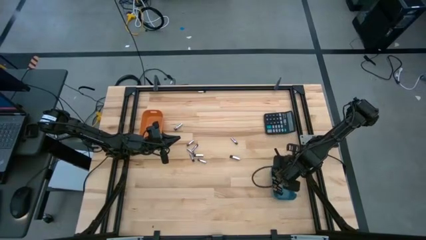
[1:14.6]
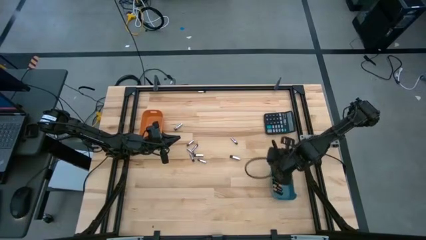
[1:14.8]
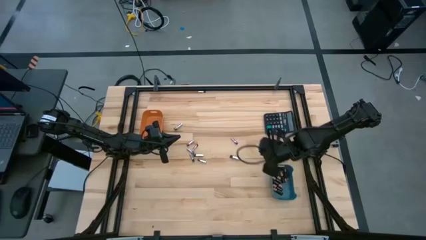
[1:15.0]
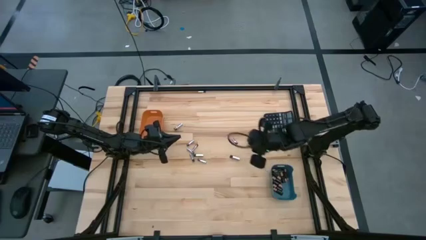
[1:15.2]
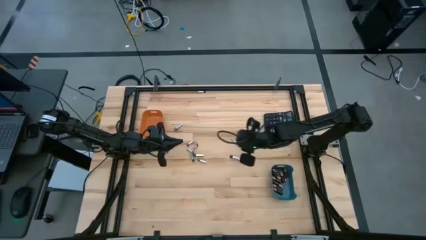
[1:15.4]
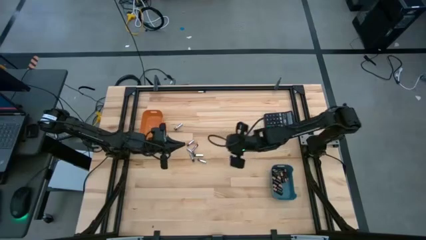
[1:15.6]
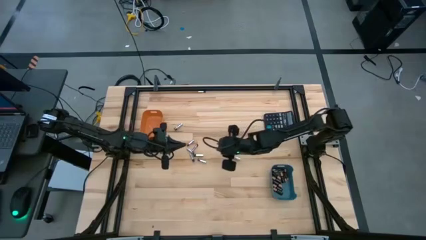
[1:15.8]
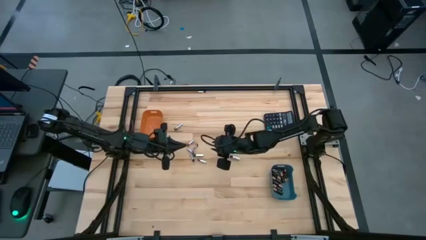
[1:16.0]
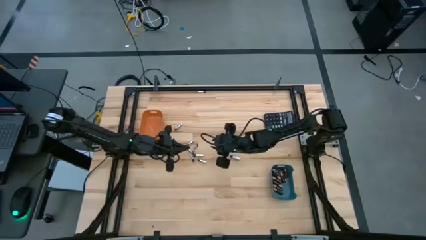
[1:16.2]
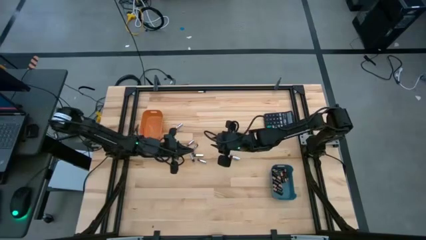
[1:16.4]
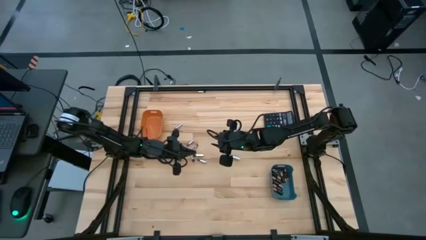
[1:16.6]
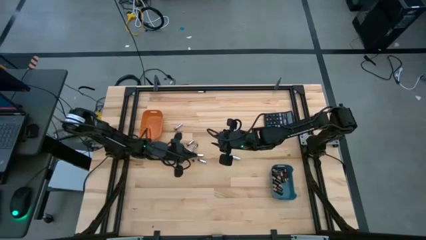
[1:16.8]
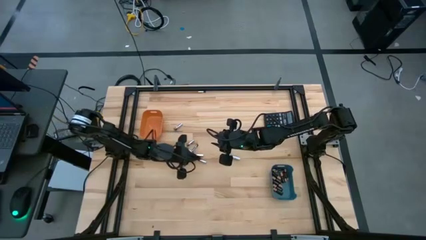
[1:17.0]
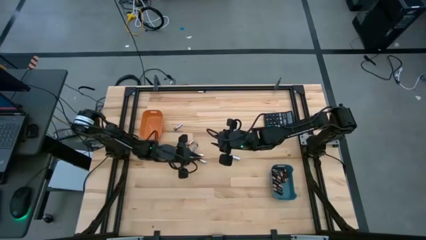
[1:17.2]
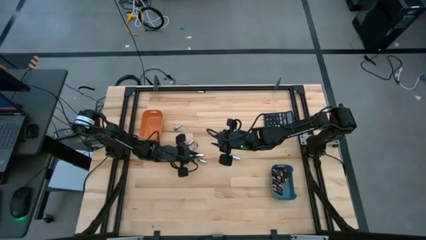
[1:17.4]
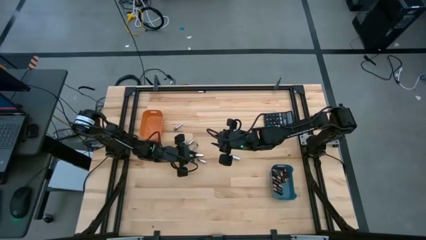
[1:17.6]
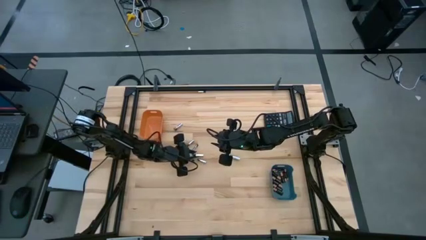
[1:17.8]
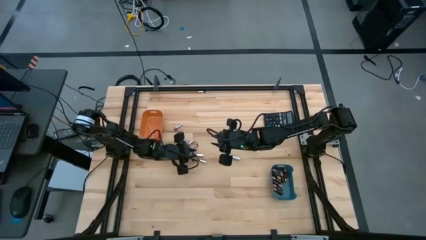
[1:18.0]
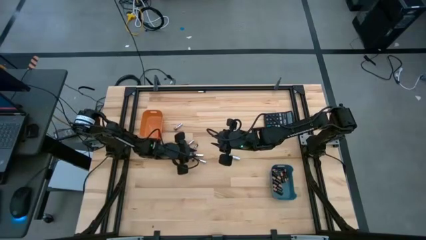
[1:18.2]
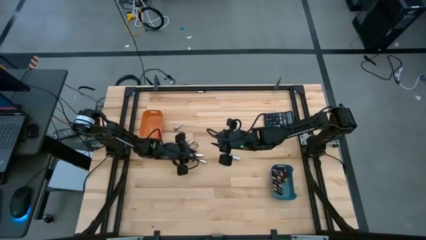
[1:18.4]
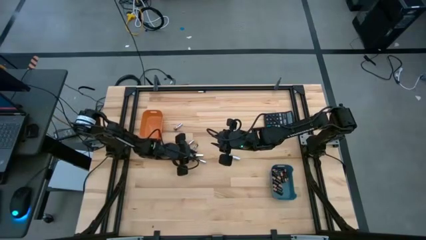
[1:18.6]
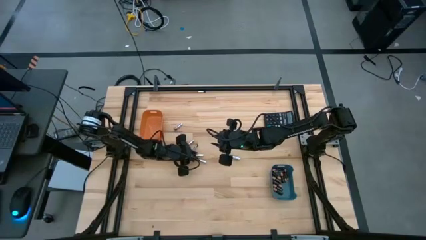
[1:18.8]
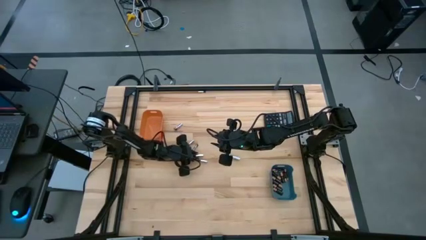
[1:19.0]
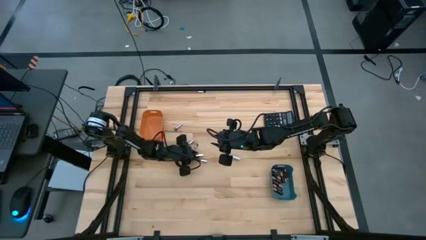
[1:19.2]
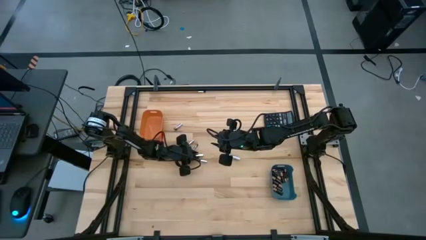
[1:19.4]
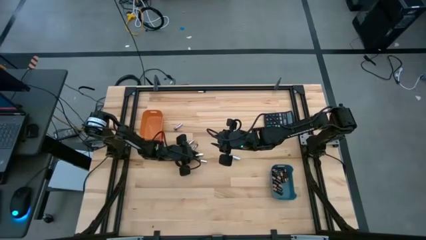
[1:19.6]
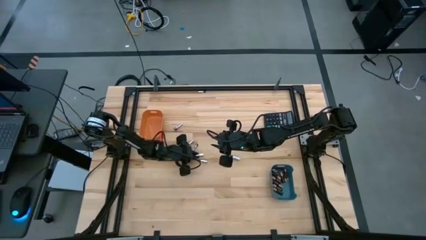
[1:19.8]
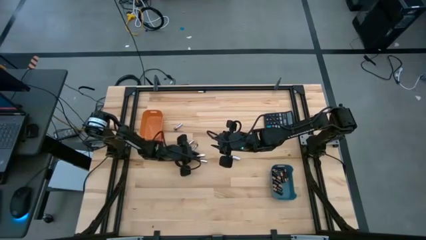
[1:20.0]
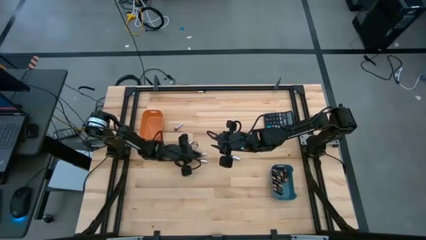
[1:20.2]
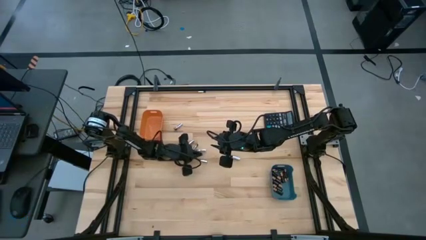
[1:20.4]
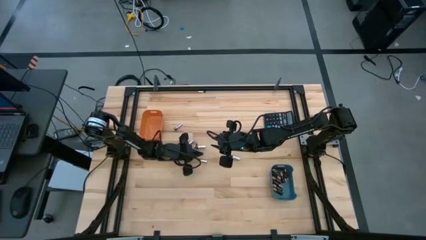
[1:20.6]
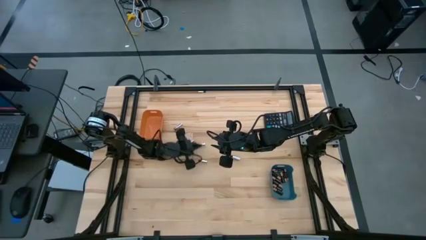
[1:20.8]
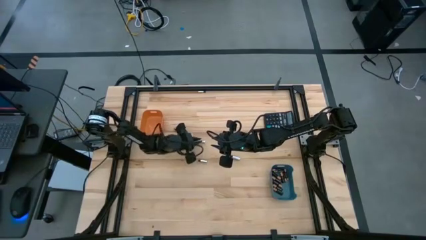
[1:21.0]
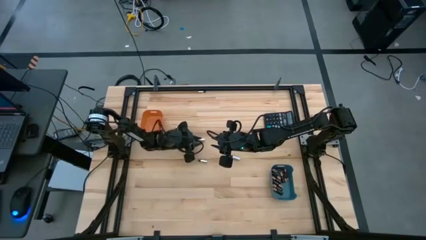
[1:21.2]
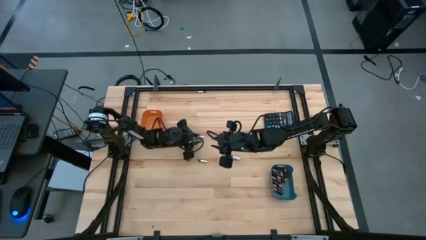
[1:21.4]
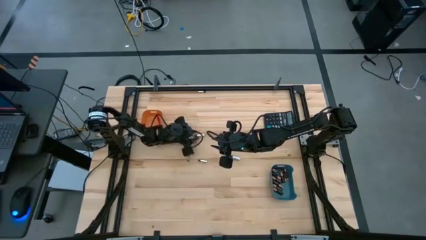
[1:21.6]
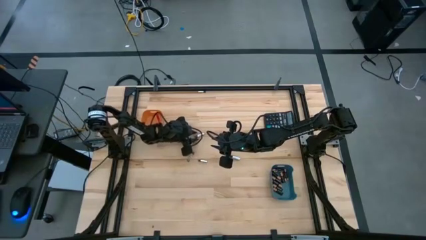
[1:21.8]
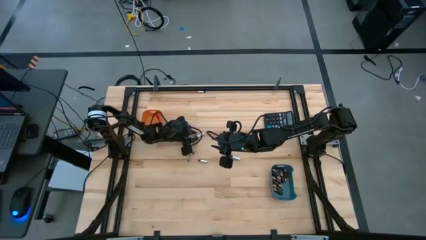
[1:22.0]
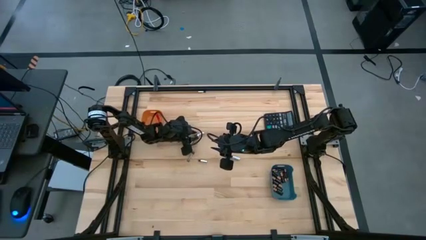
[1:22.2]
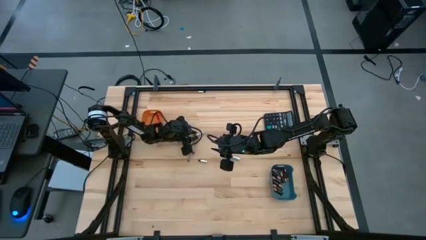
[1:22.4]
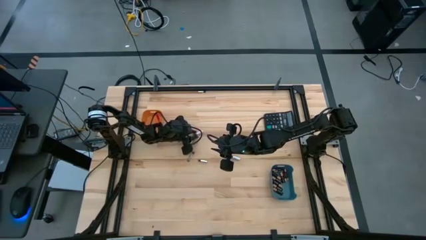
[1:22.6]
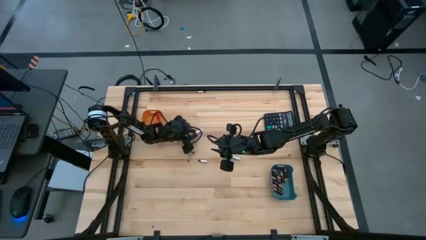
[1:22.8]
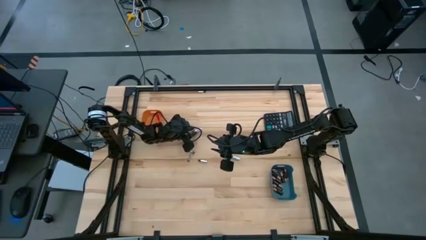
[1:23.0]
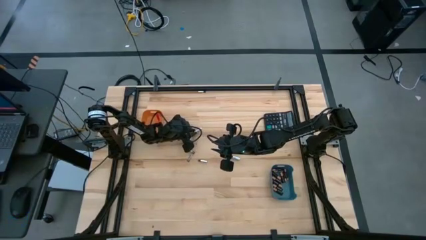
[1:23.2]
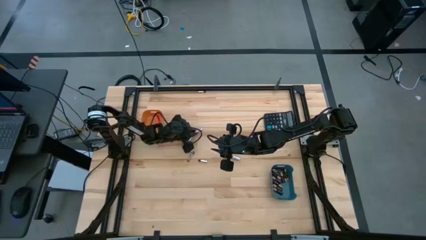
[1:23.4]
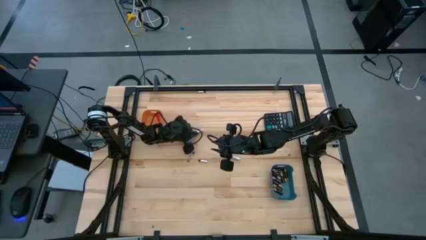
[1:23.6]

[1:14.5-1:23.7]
Task: Sort batteries
Put the silver battery into the orange bin

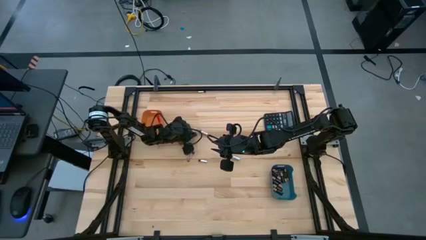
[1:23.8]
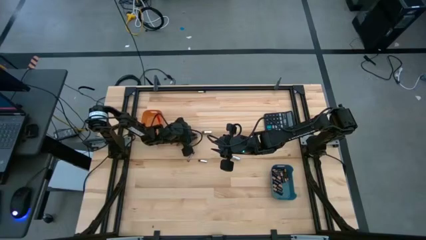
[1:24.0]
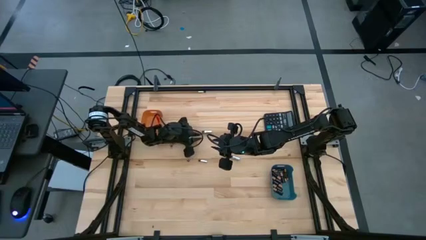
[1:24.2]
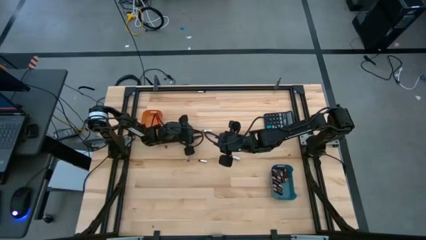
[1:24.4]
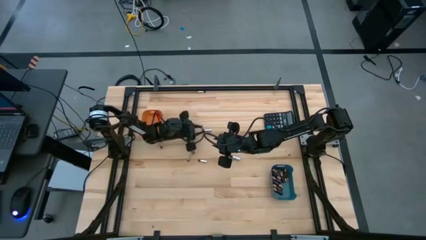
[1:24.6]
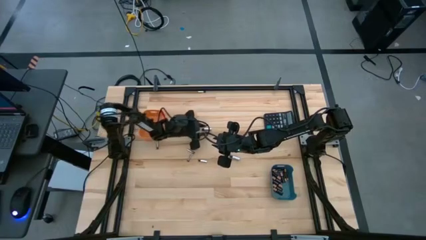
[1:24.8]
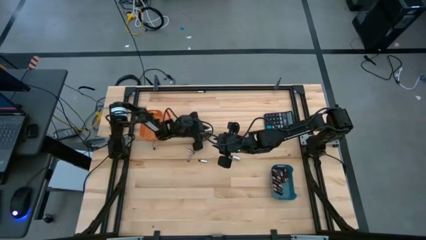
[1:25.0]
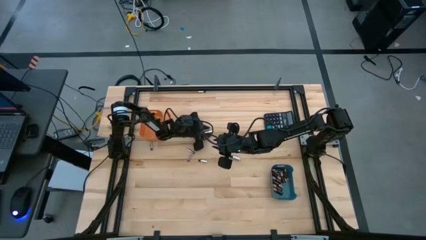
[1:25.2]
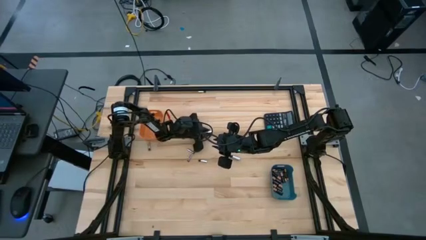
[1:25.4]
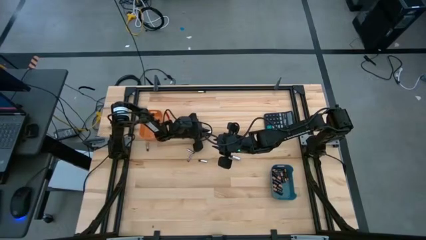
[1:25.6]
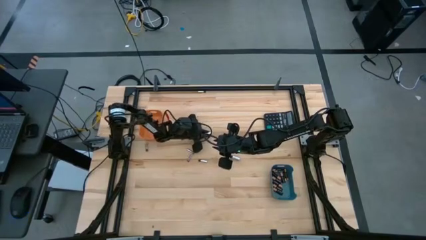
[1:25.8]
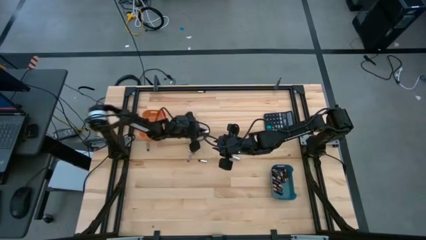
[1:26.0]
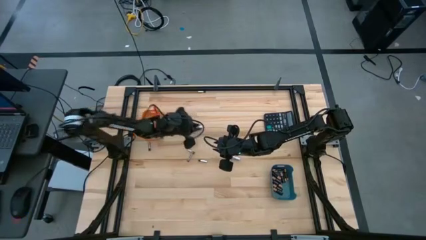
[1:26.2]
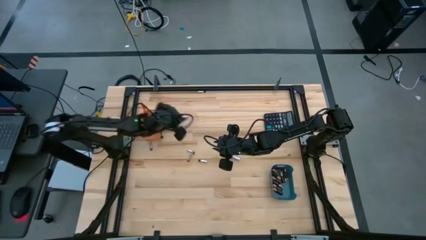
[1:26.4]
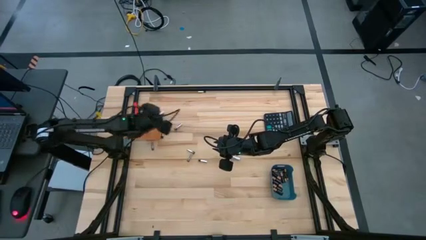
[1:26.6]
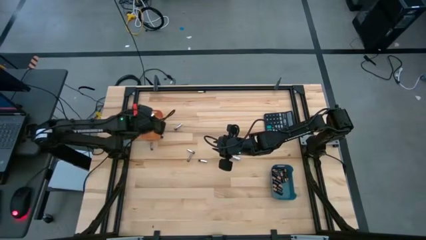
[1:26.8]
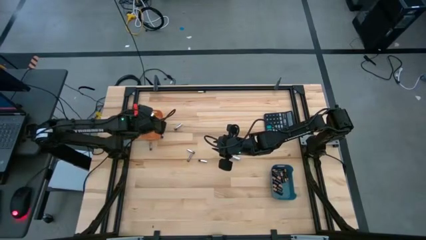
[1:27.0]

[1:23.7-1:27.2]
Put the silver battery into the orange bin

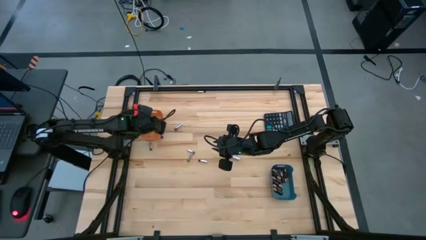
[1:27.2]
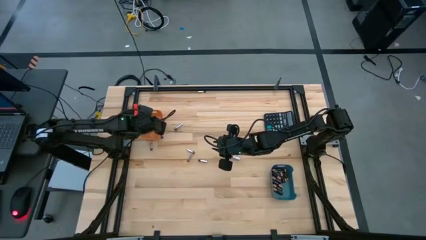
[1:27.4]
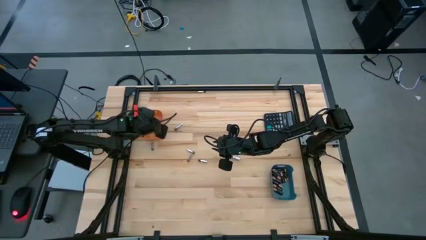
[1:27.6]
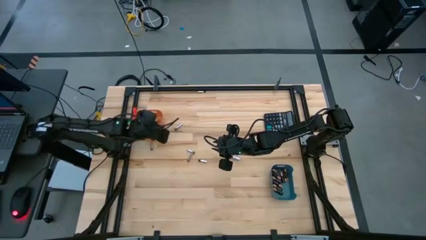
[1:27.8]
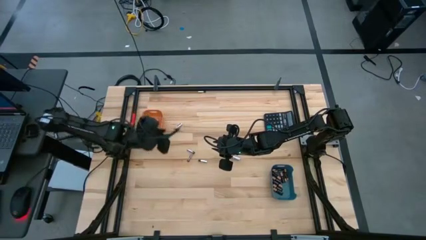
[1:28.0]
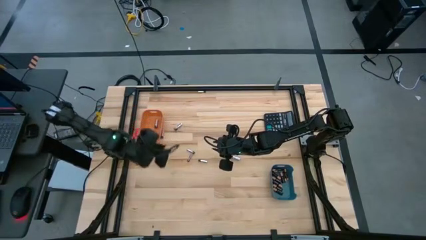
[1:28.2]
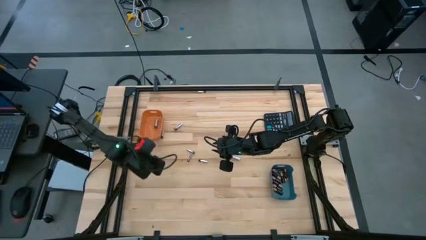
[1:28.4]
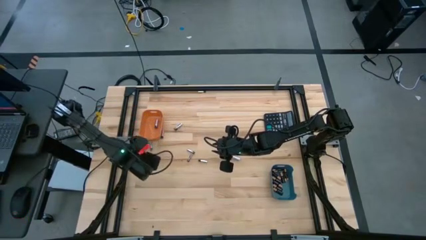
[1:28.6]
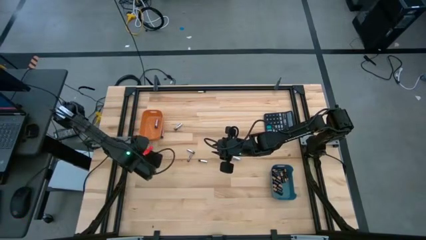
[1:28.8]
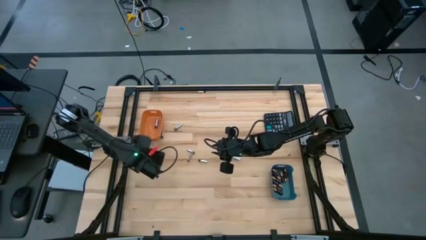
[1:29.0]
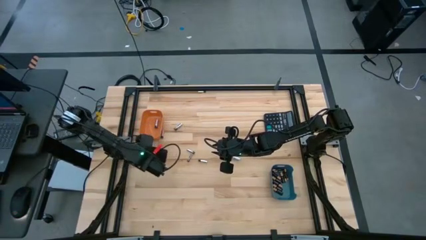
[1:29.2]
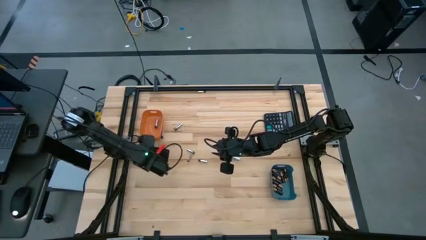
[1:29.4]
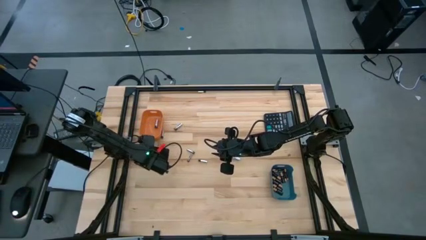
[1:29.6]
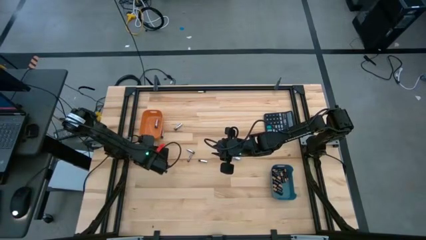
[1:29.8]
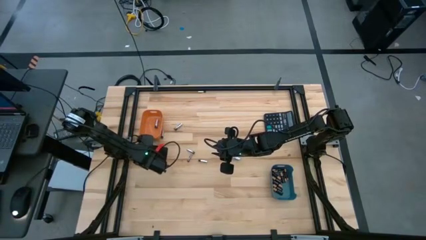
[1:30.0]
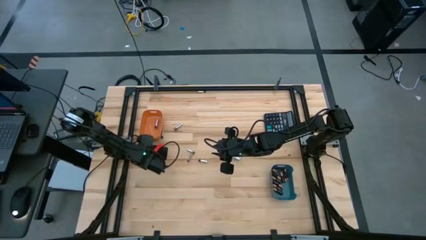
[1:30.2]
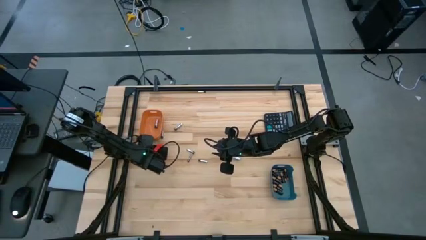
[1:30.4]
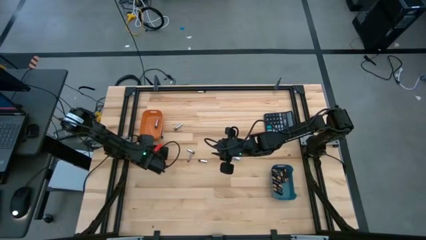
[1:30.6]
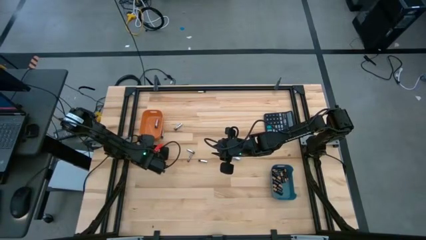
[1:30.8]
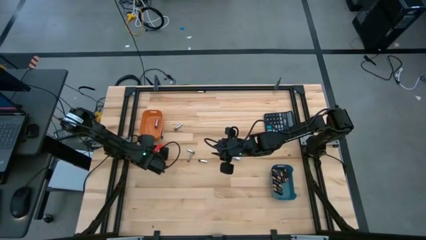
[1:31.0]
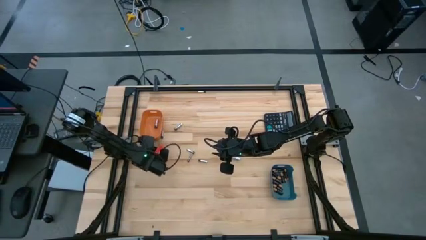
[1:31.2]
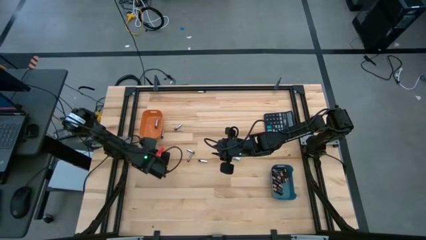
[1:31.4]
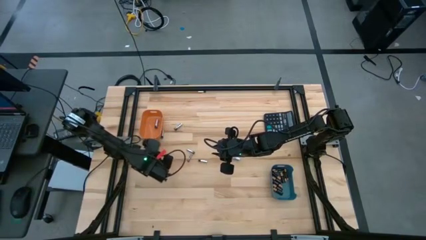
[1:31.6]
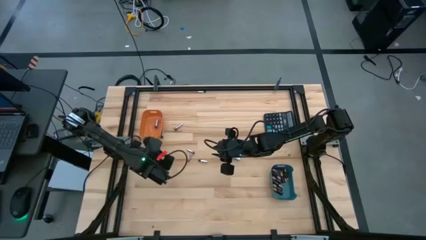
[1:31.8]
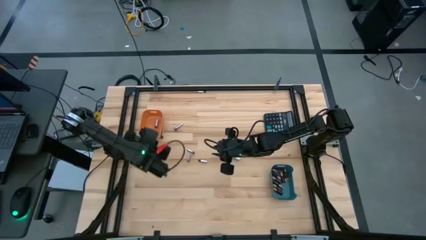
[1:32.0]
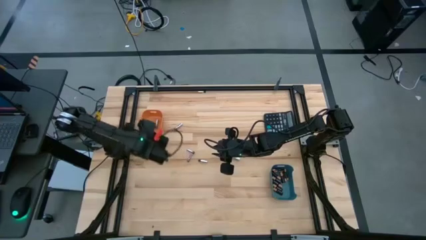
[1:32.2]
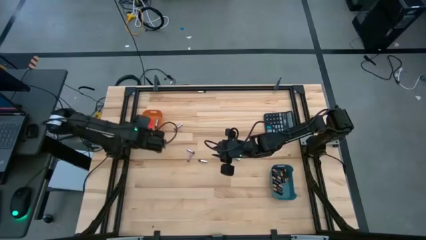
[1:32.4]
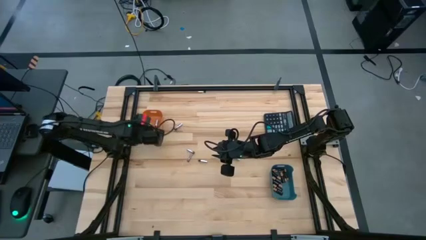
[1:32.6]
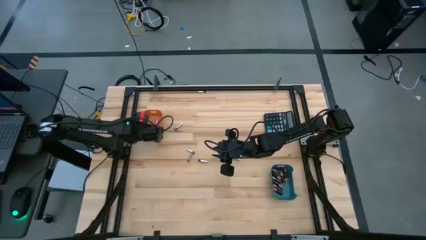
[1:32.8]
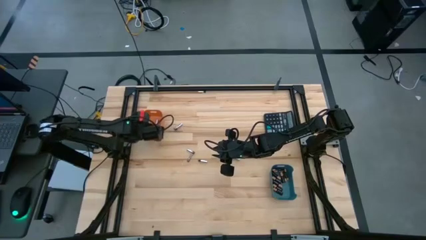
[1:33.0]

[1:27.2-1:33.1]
Put the silver battery into the orange bin
